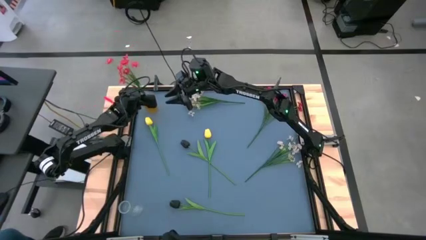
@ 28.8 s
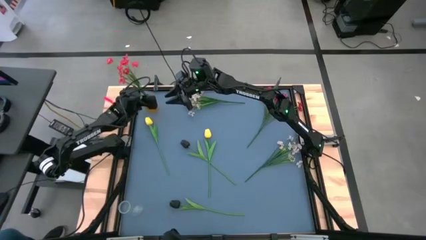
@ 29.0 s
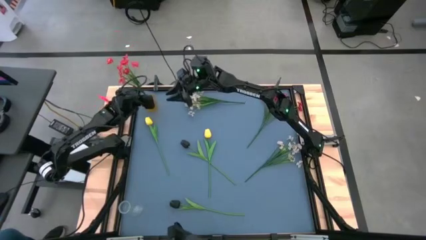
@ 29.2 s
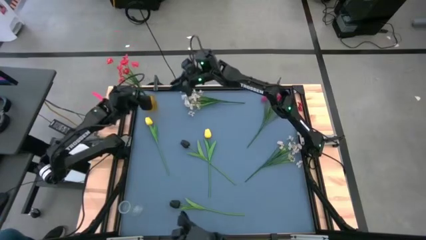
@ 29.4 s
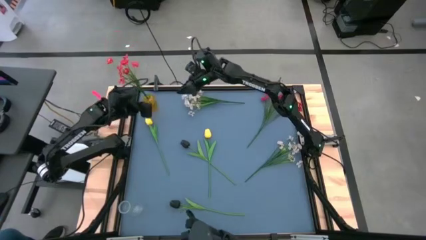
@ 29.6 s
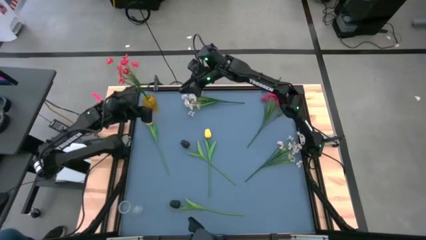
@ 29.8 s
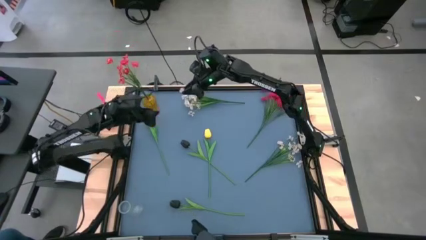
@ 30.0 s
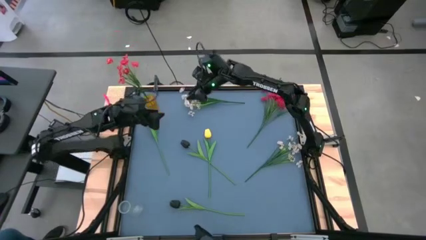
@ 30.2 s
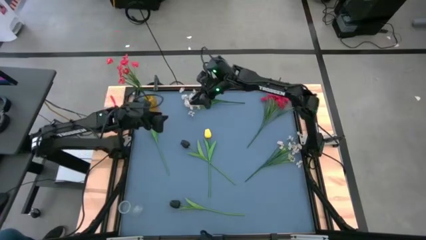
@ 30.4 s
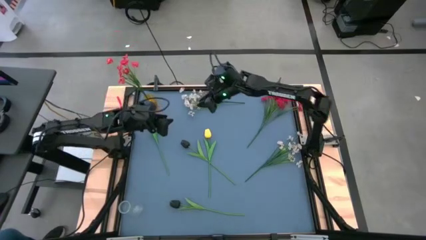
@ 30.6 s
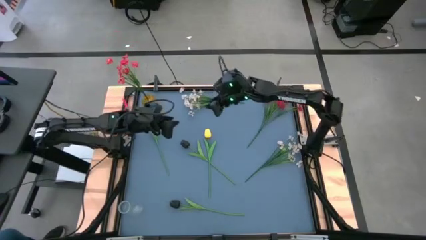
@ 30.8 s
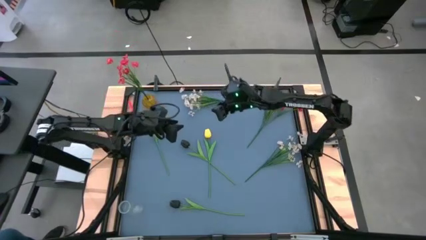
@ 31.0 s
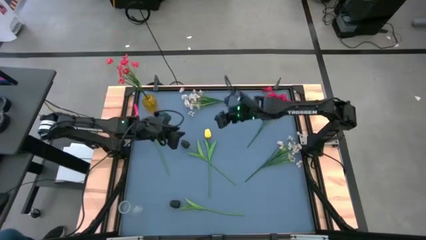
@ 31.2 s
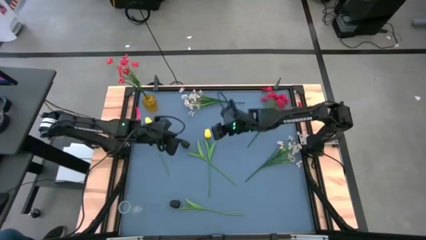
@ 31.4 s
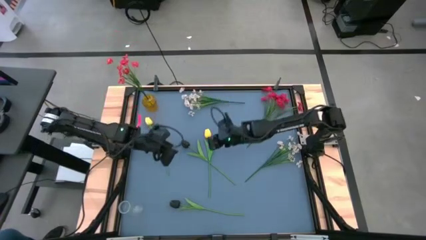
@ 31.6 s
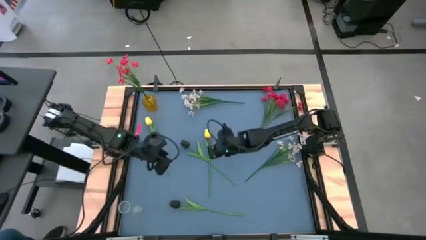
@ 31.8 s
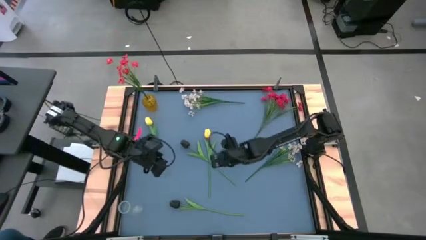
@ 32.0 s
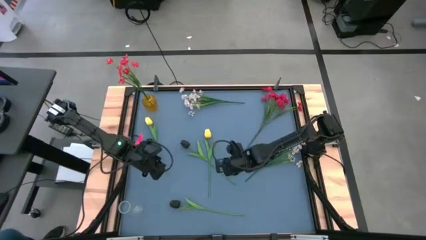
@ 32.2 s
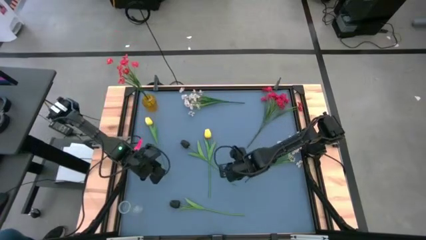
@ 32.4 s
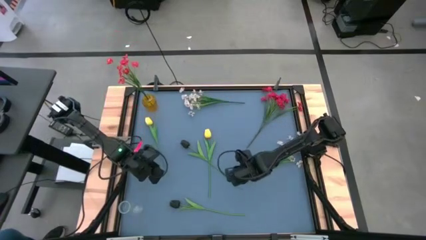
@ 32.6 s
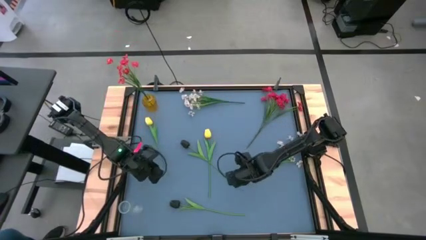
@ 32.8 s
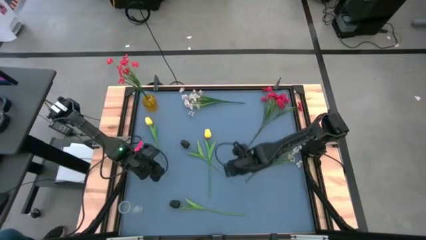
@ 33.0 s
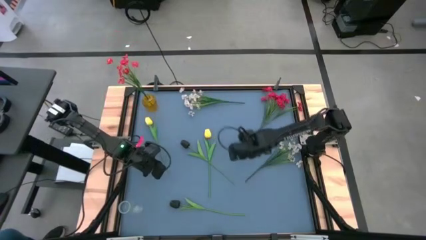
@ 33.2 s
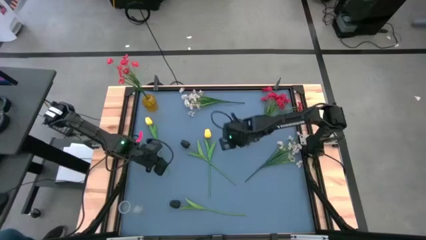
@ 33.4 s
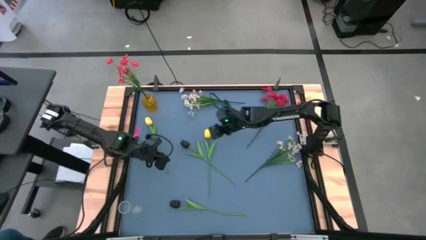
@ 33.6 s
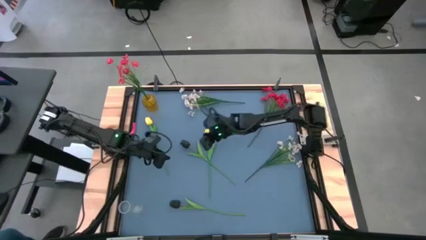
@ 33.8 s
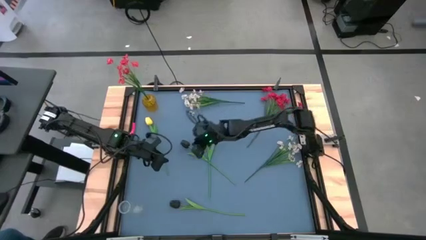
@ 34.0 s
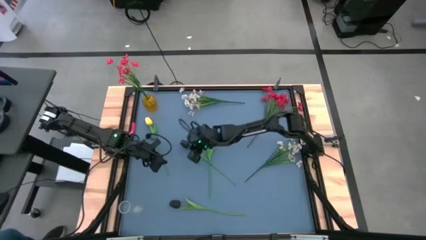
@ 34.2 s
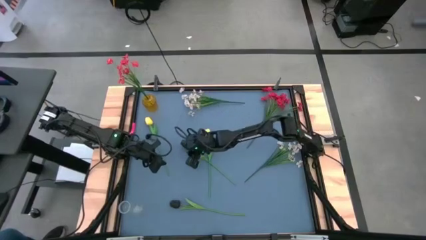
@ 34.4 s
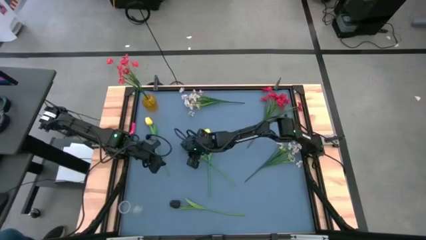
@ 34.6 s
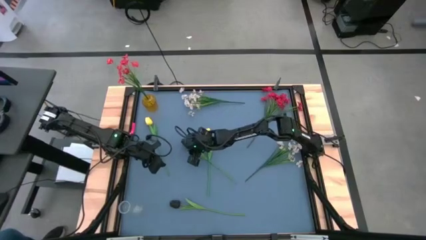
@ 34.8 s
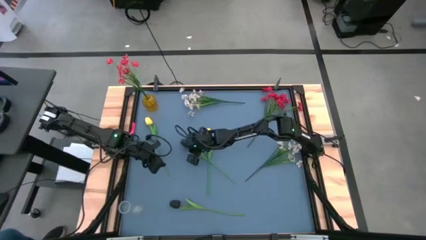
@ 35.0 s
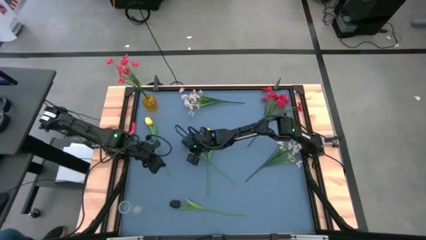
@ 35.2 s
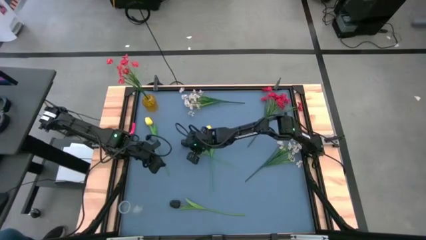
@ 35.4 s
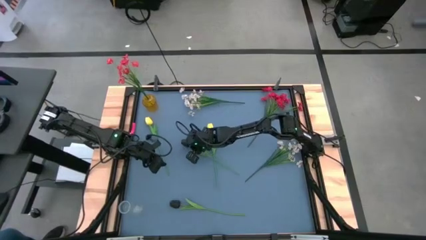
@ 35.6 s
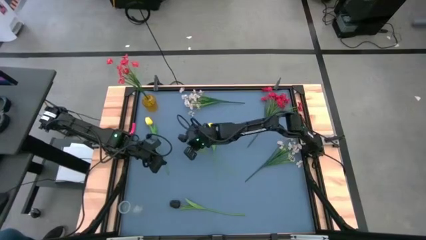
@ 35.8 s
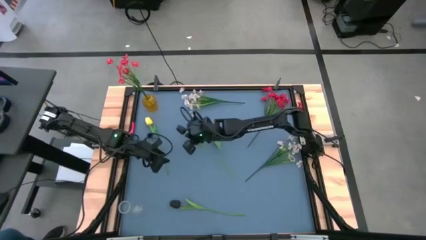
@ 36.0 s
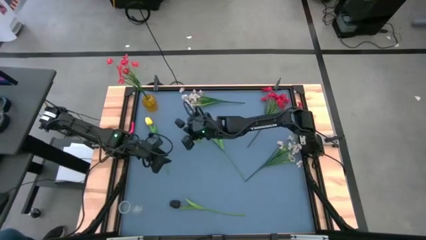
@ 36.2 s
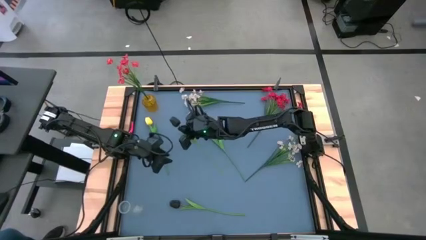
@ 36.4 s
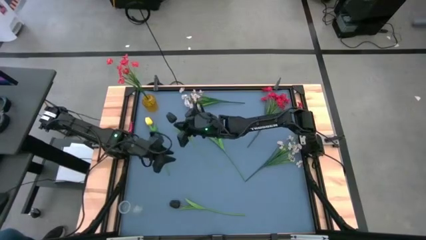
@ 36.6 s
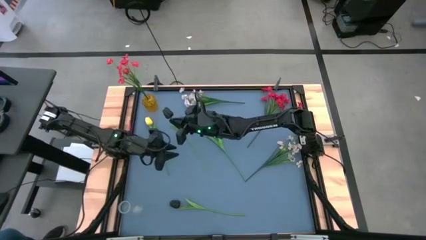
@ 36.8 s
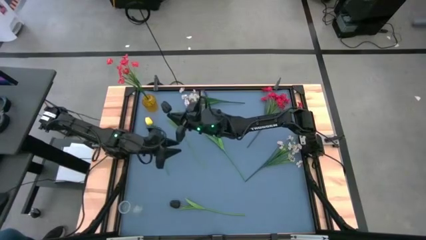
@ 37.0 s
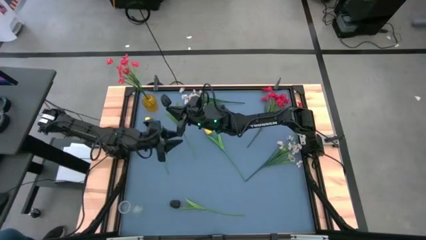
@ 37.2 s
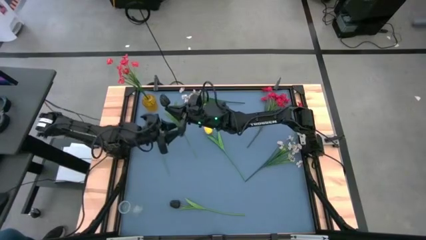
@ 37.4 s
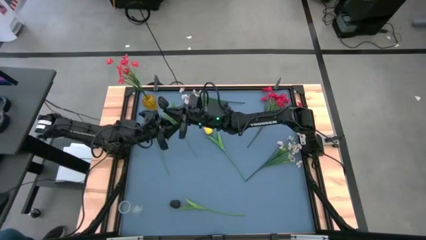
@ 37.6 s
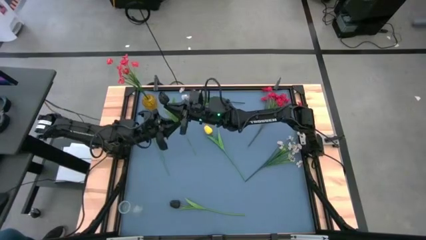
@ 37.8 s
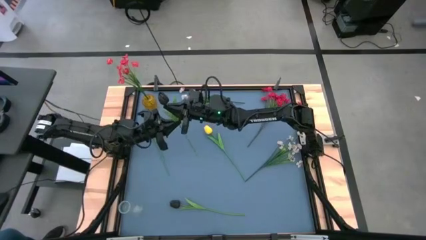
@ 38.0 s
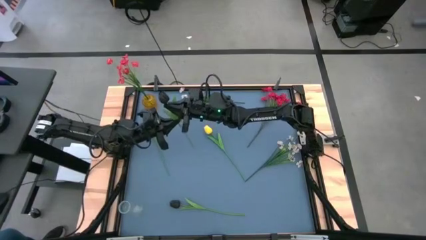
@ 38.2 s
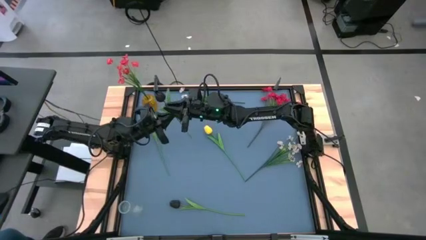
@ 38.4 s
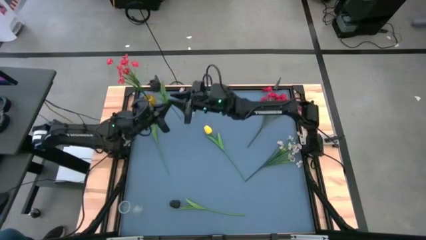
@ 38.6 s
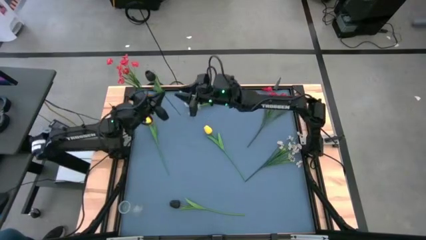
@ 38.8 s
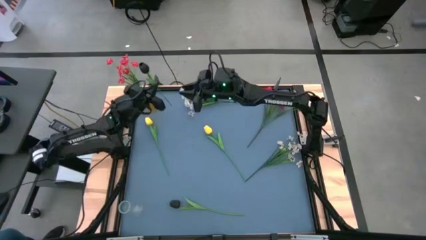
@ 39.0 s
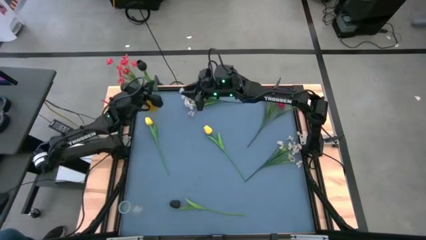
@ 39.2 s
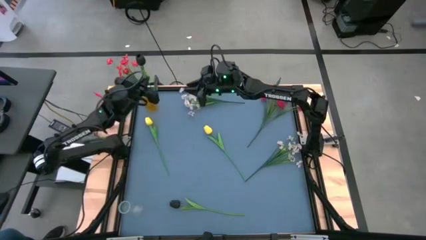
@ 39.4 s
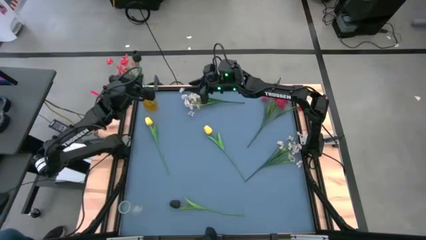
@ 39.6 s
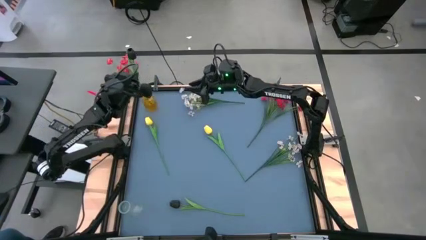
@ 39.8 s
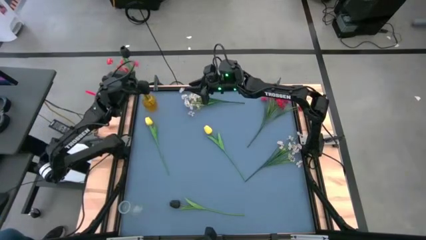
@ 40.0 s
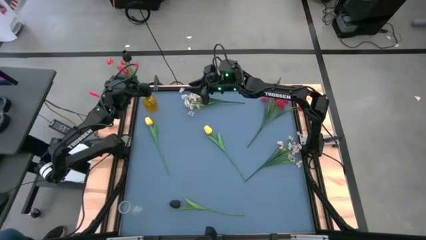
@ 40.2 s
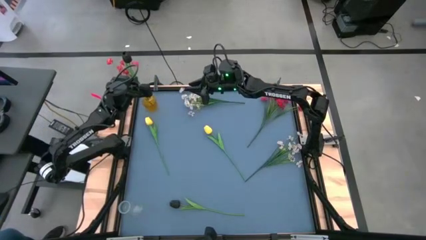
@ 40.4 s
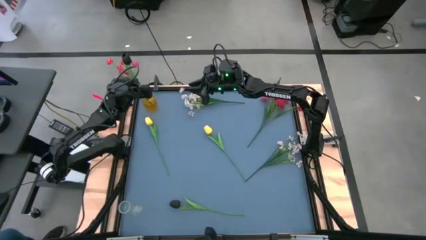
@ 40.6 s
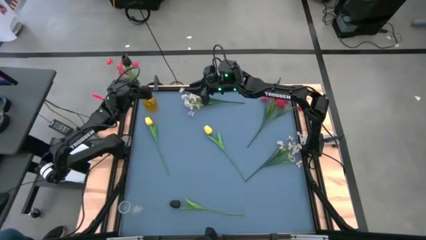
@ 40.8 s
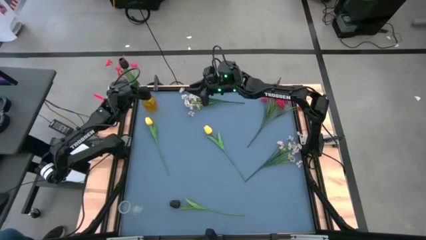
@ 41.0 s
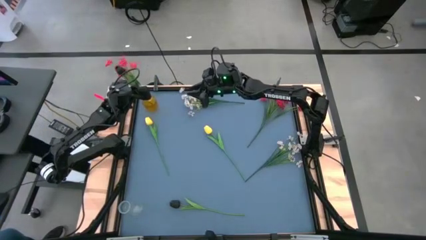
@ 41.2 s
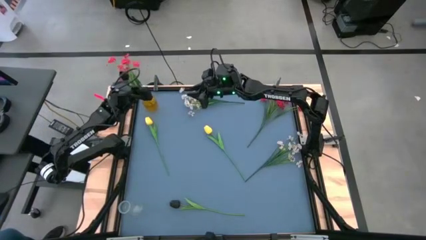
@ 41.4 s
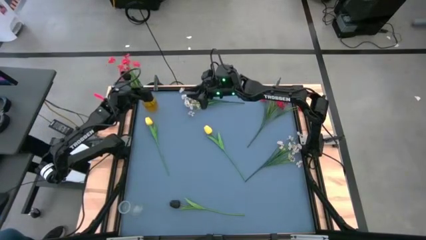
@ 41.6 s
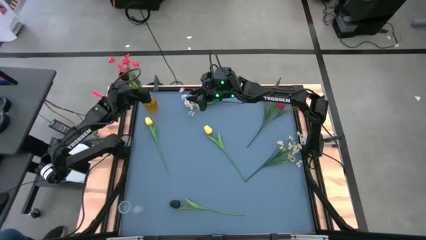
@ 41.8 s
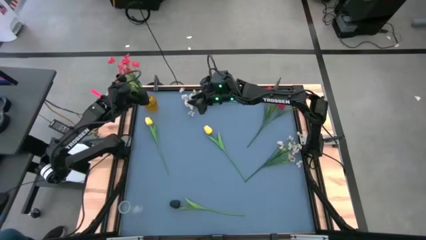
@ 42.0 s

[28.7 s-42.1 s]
Task: Sort flowers into vase by color
Put the top black flower into the yellow vase
